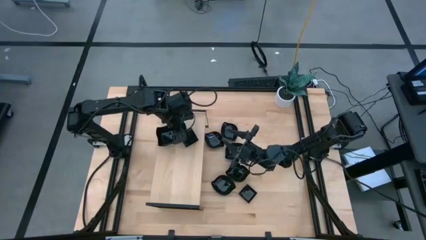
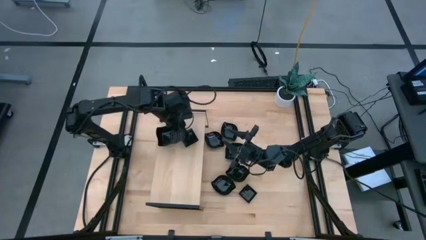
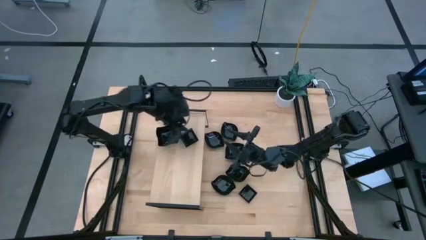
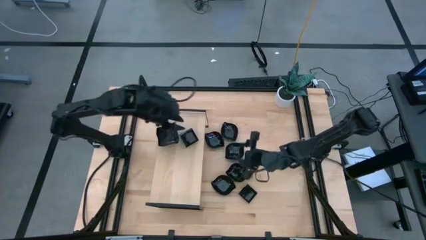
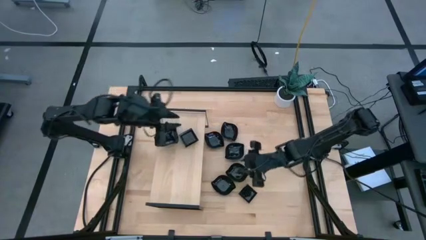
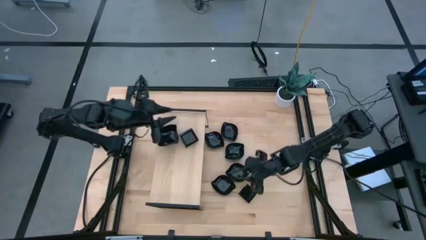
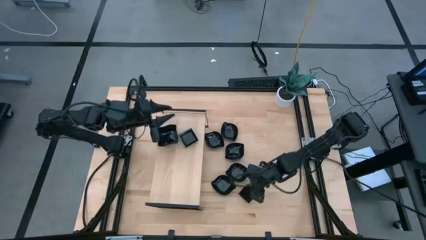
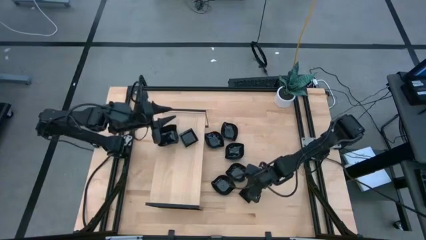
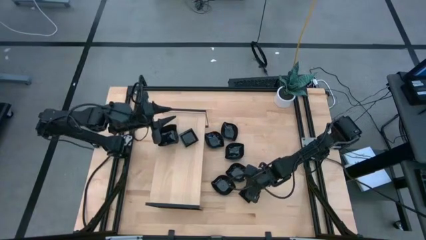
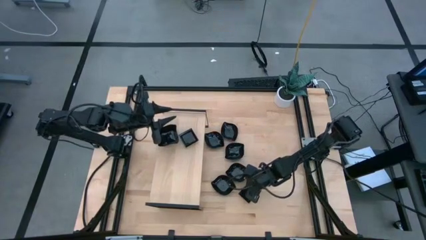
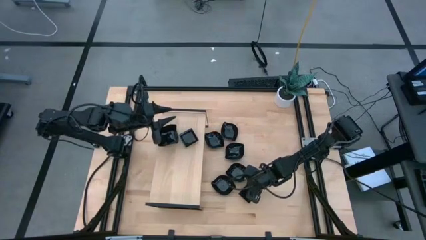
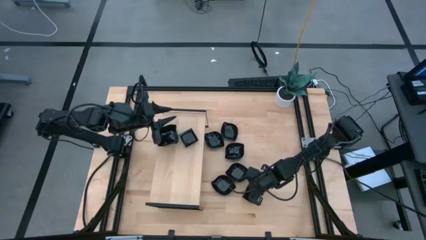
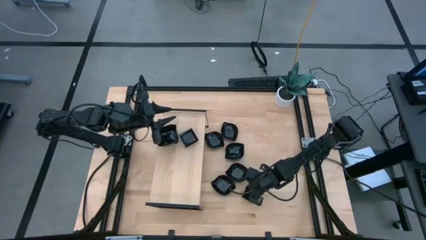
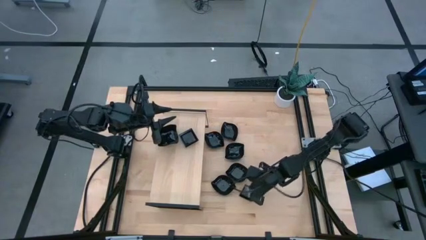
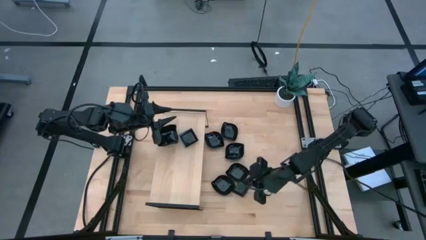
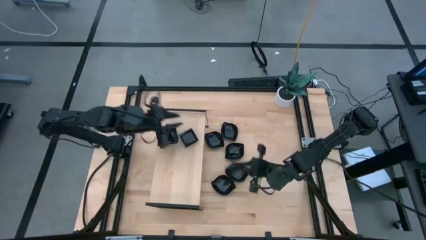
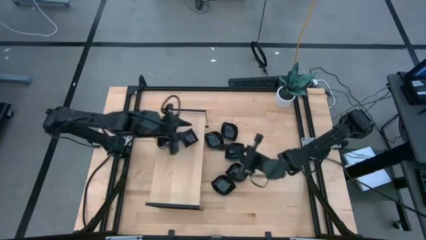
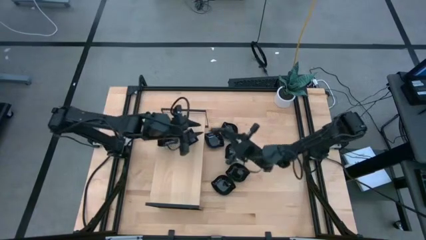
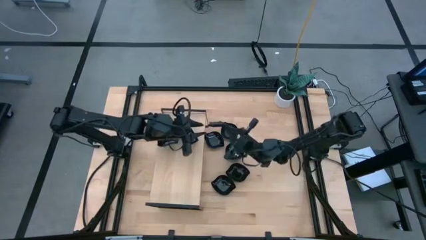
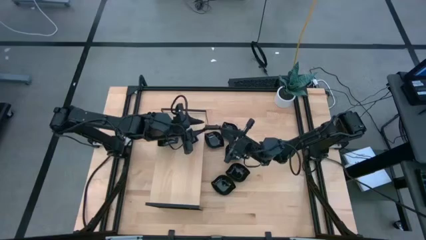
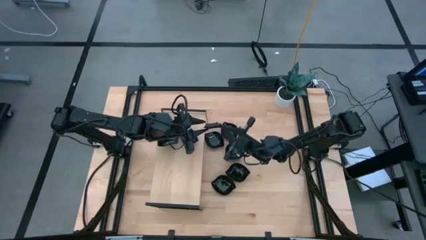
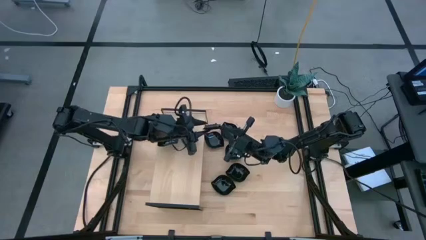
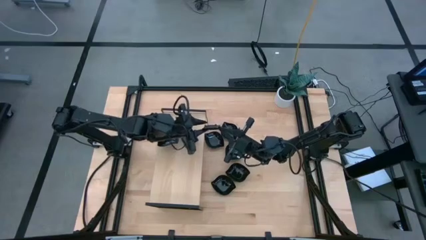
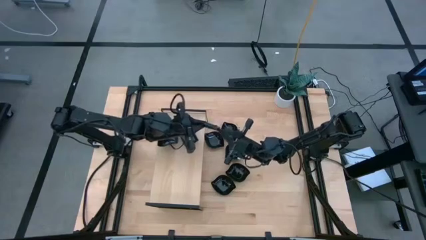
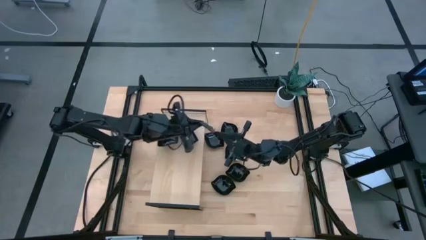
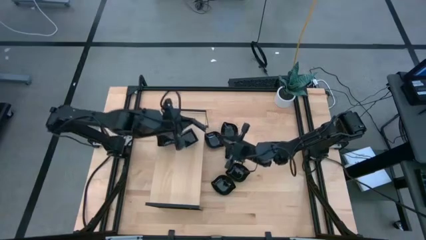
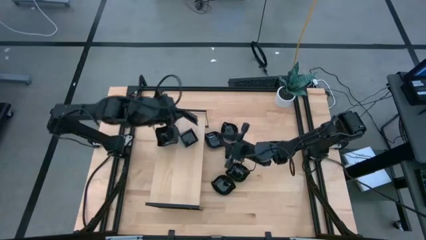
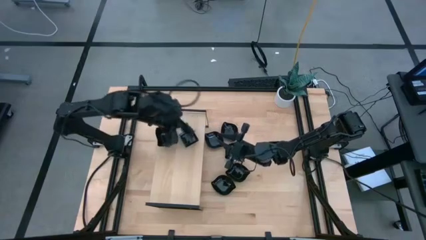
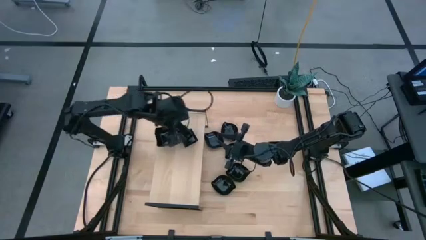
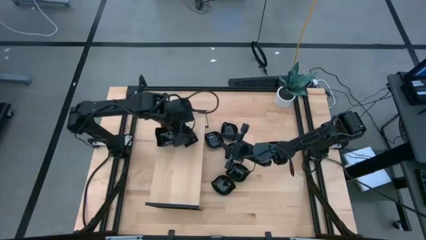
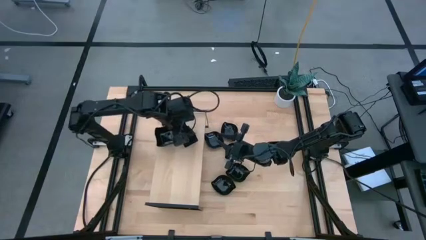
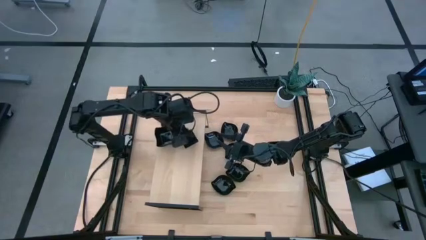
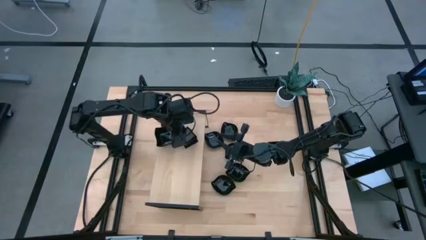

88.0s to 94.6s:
Task: Pick & Place Mini shaped plates
Stack the square plate on top of the square plate on the shelf

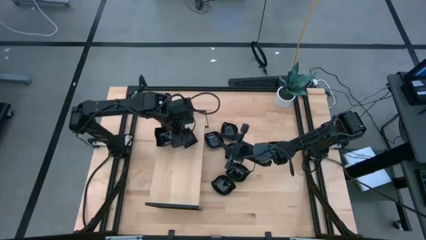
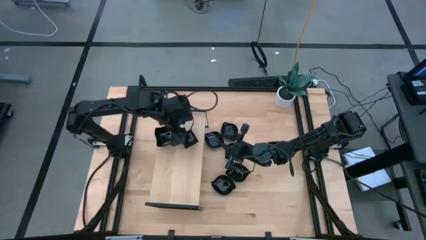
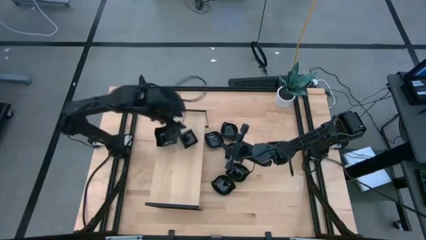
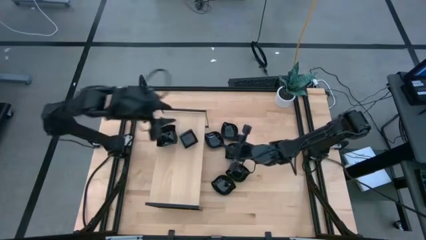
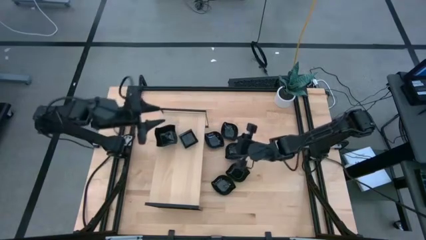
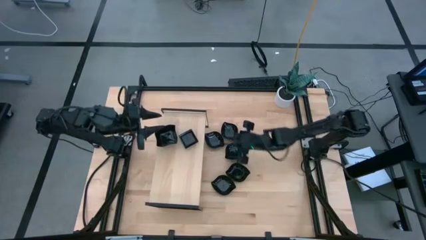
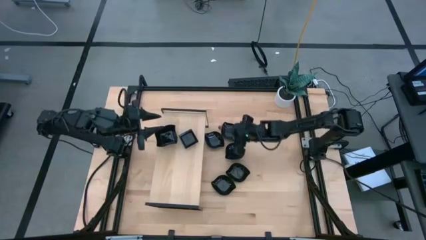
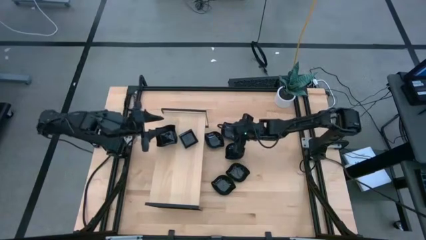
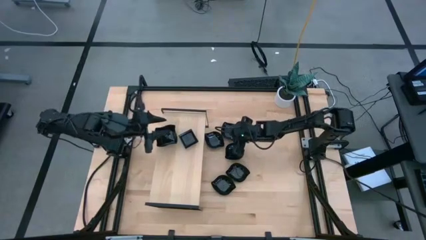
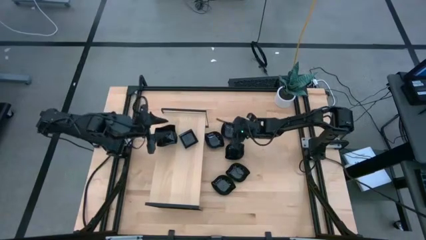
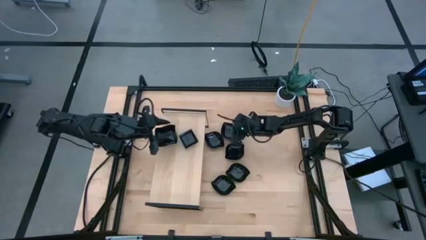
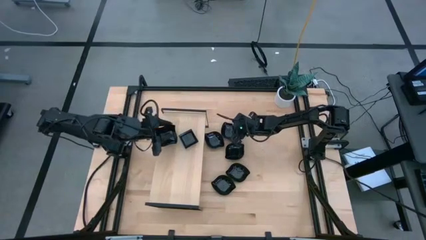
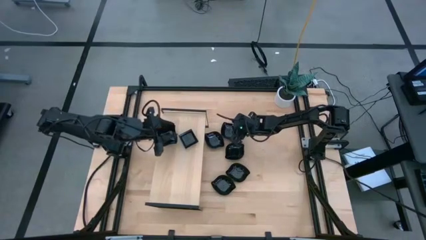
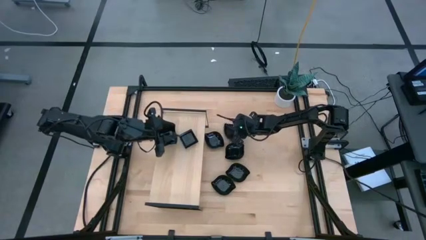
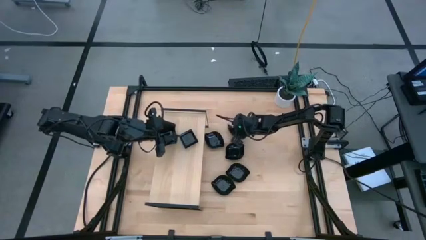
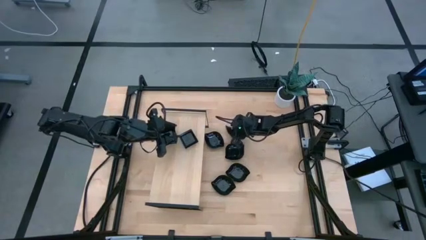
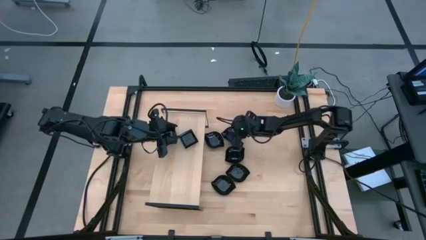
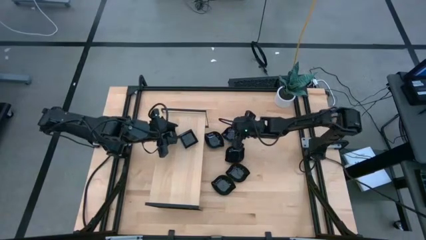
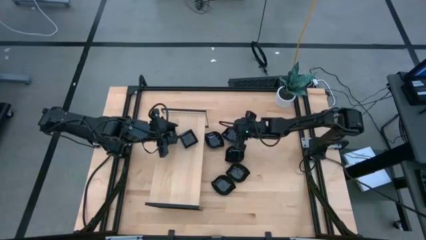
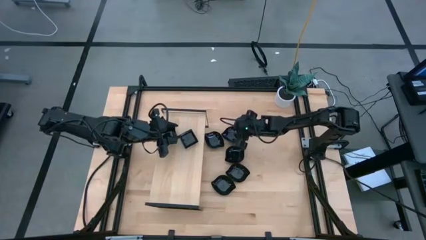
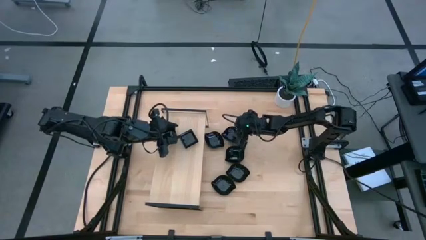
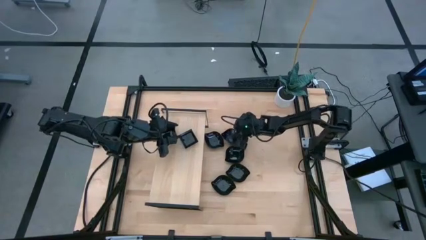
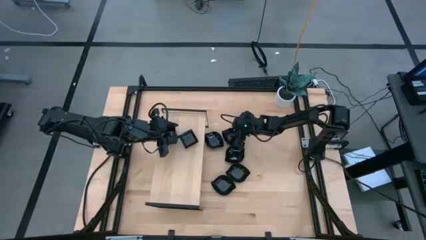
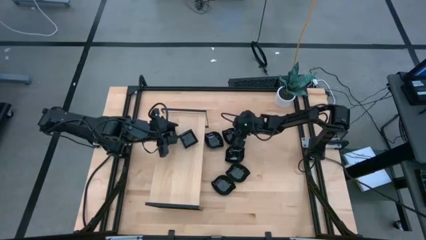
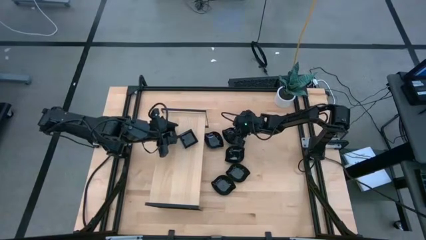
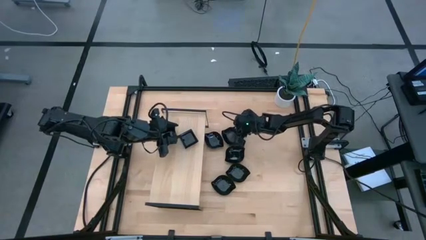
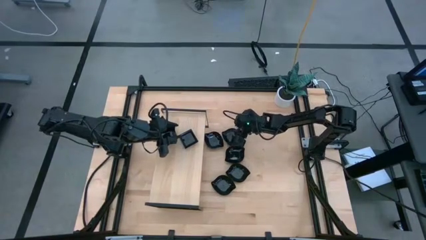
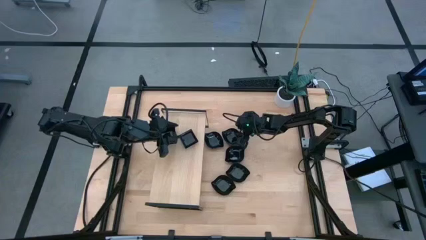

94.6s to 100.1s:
Put the leaf shaped plate on the shelf

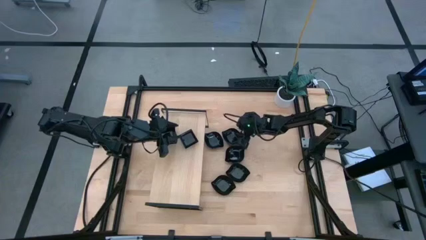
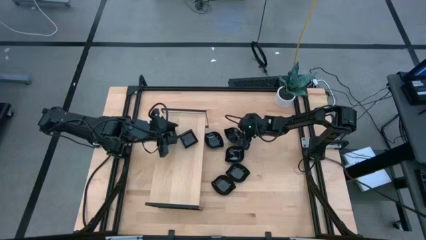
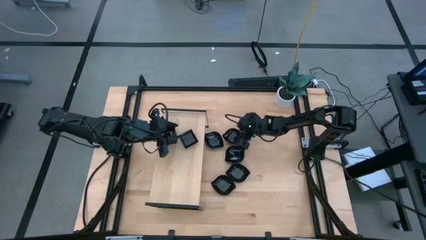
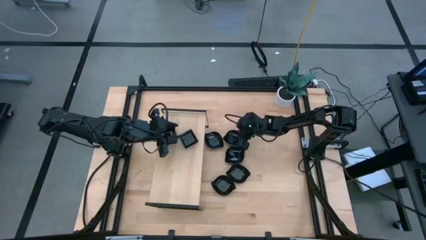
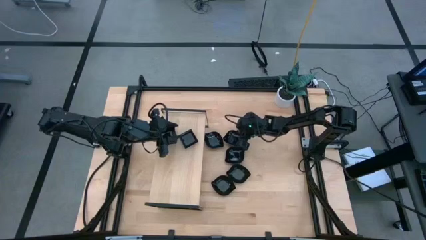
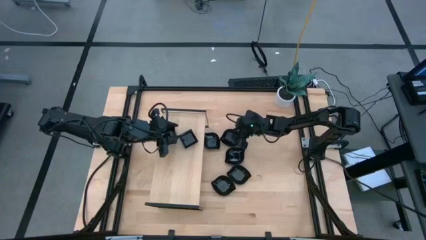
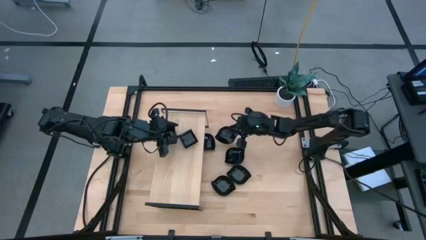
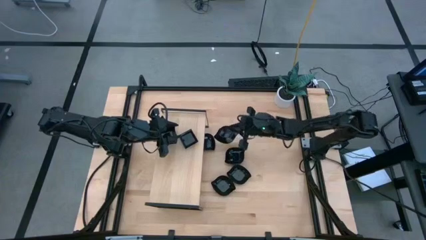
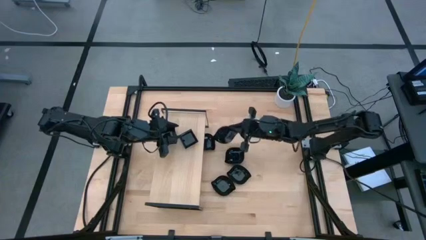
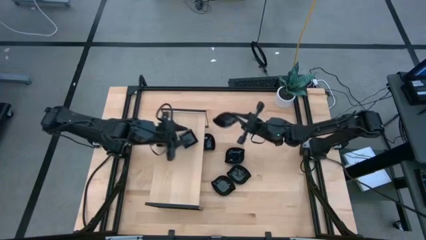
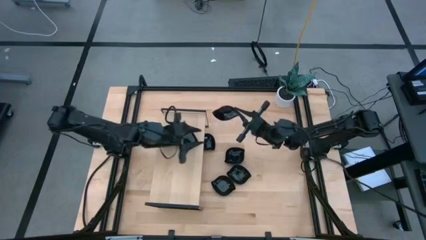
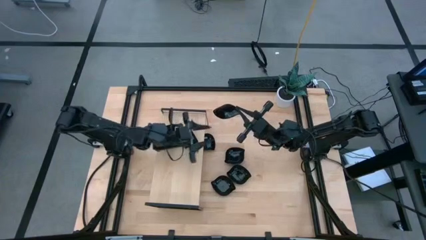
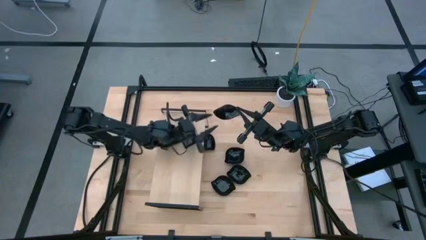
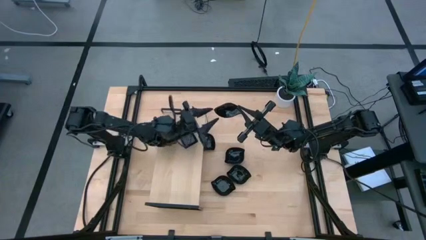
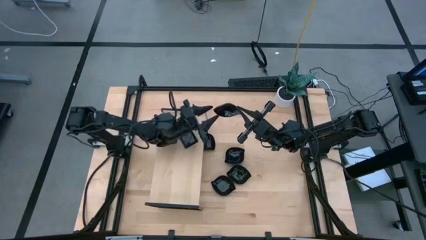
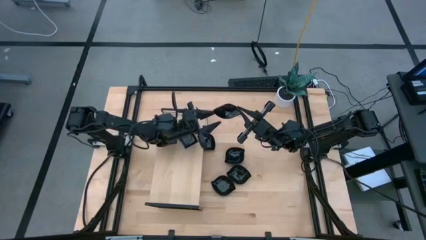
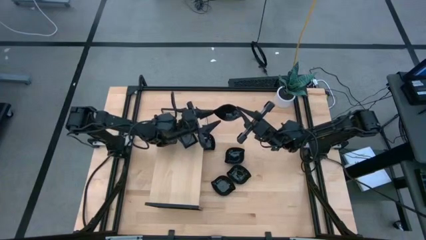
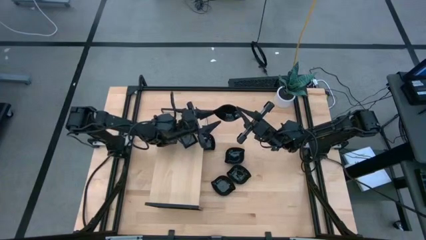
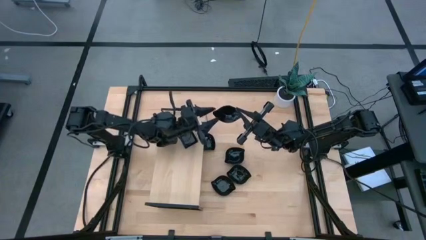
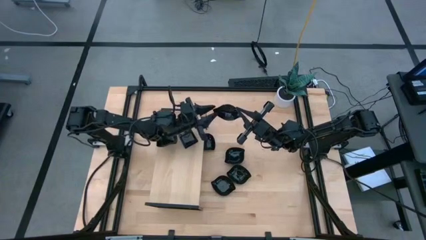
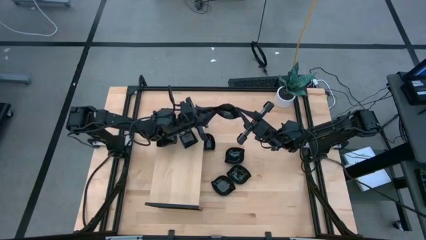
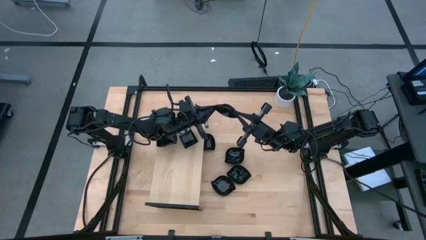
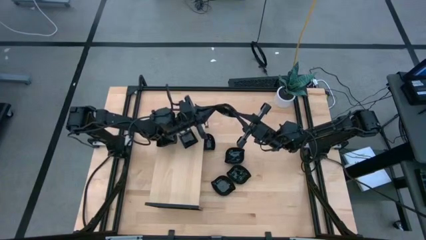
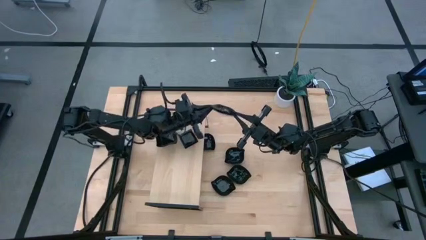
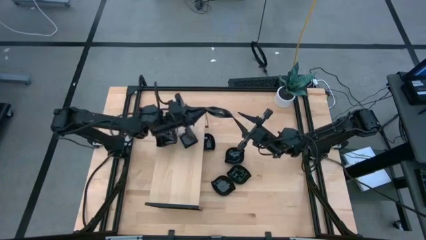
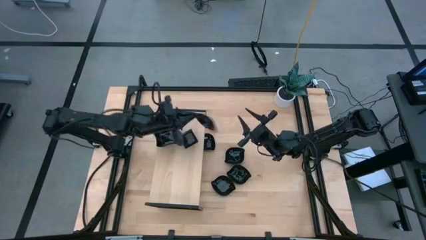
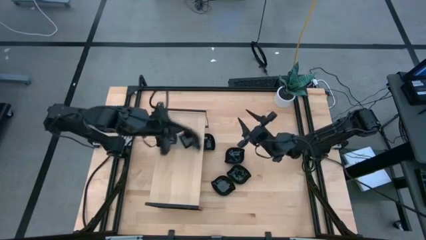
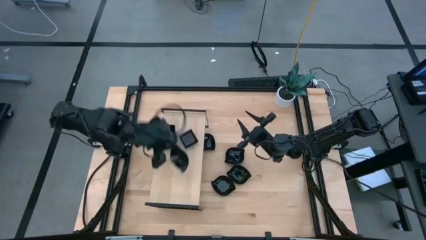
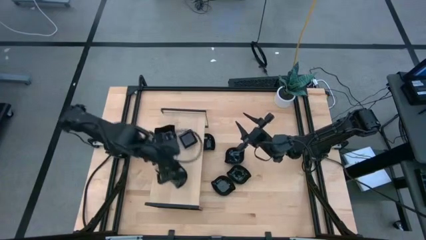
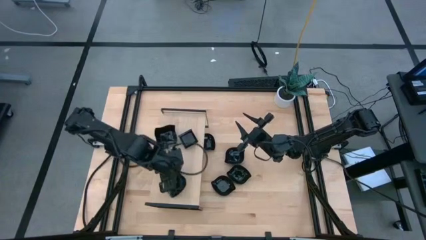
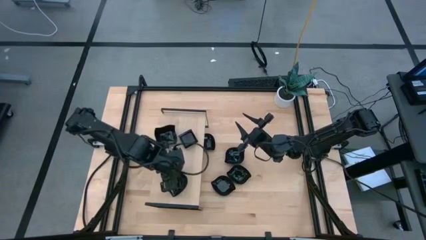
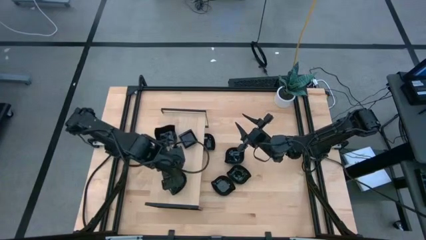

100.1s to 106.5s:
Put the leaf shaped plate on the shelf
